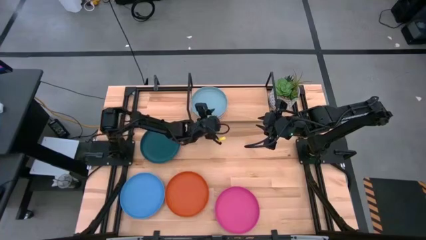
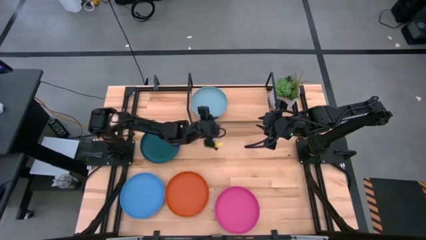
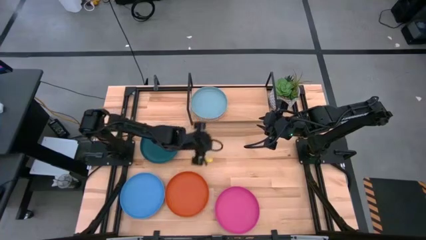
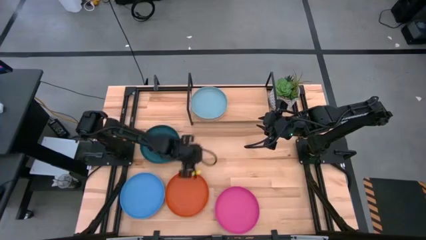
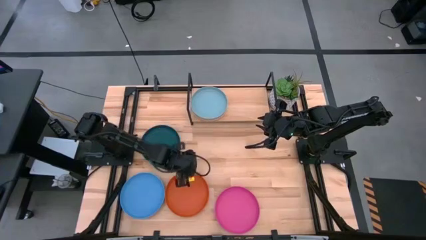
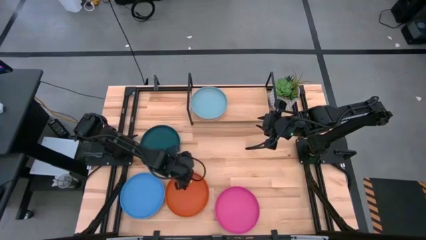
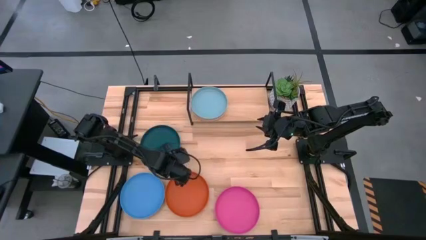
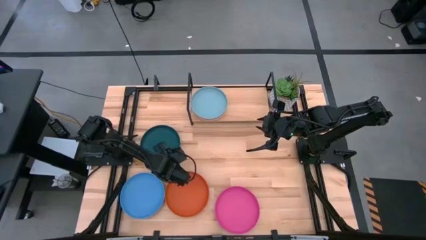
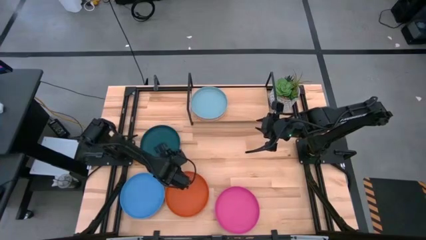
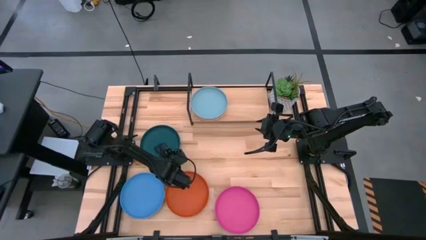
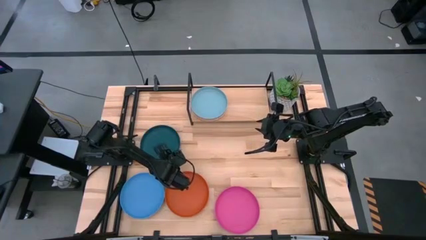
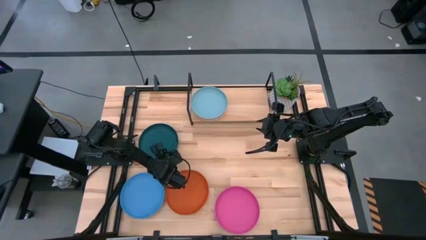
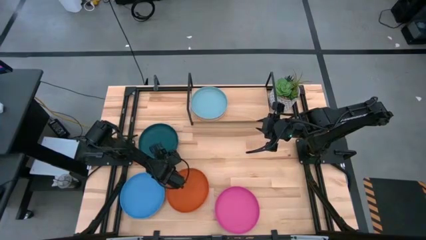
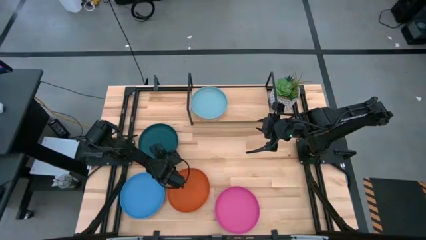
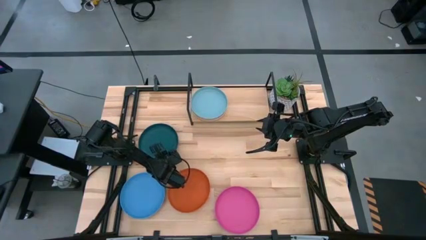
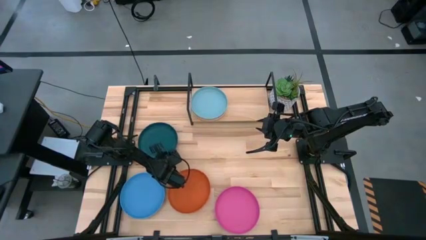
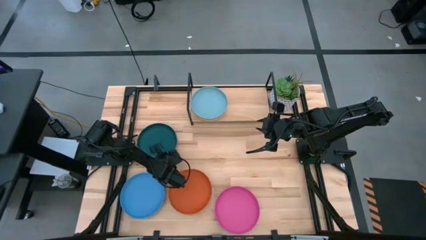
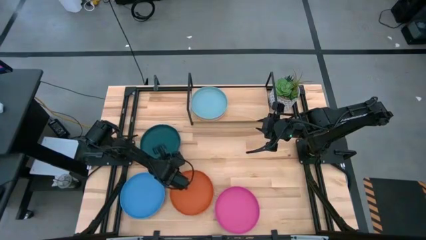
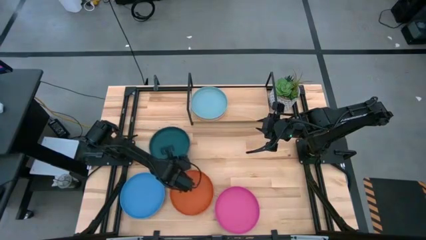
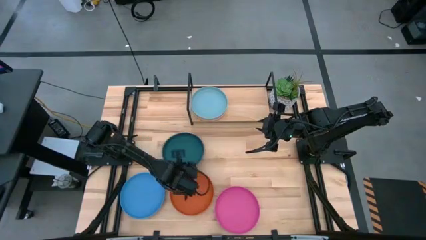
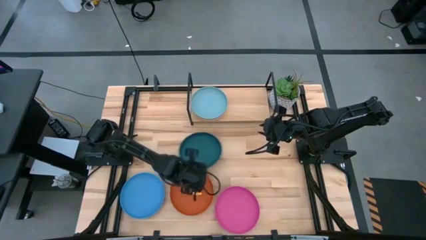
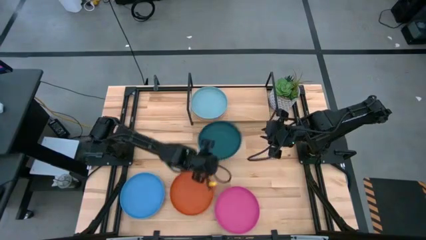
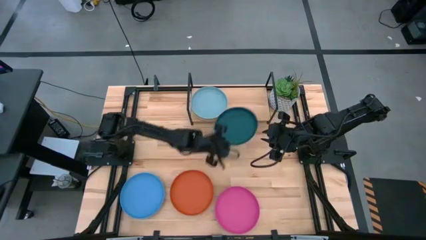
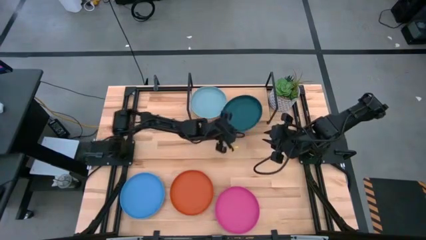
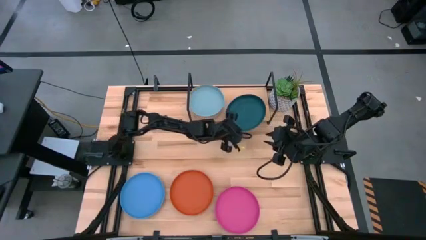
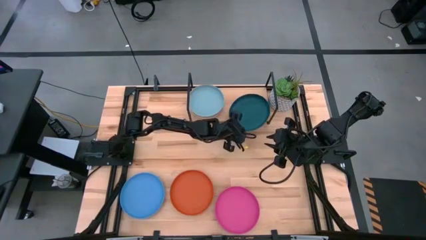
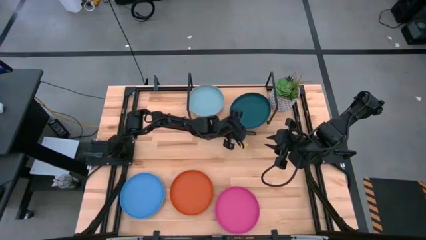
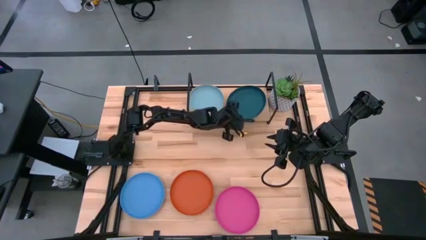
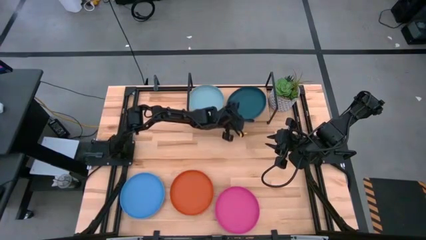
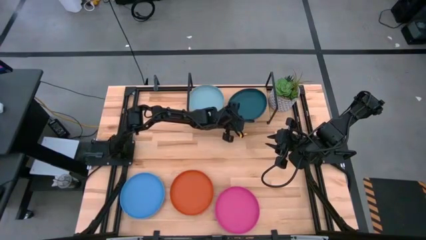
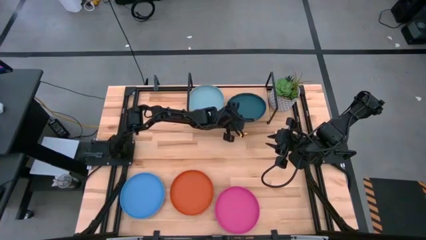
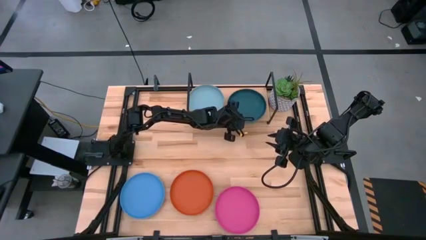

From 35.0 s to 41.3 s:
Task: Place and stack plates onto a shelf
Put the dark blue plate on the shelf

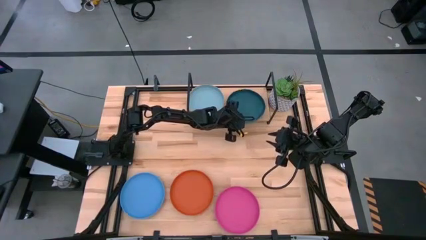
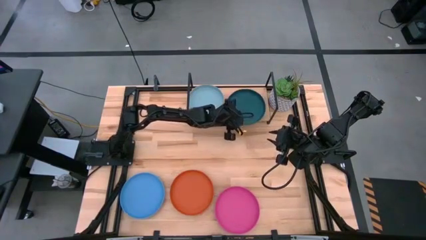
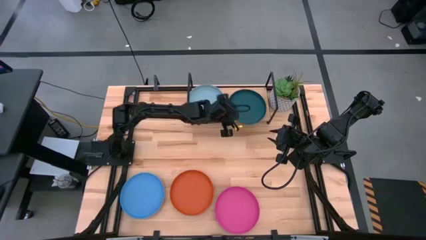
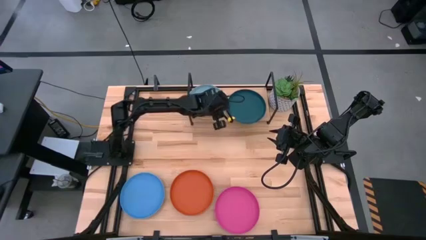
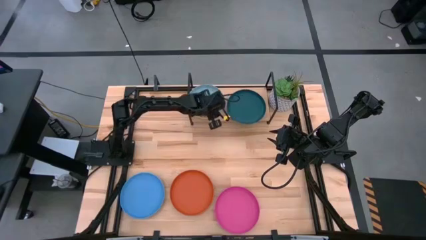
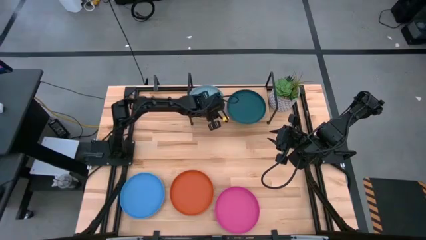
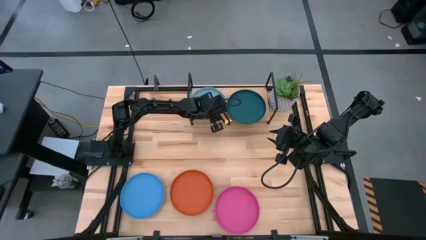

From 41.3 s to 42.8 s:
Adjust the left stacked plates on the shelf

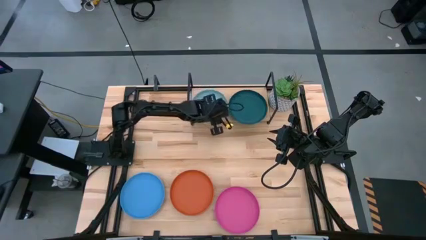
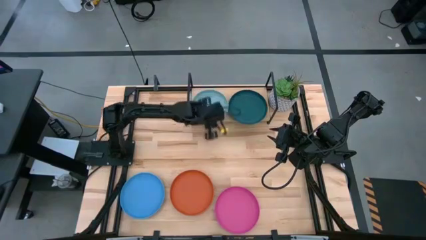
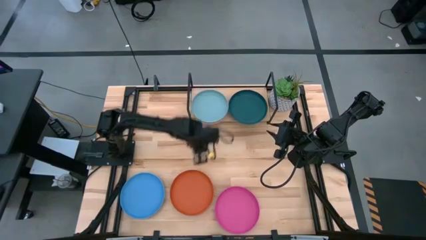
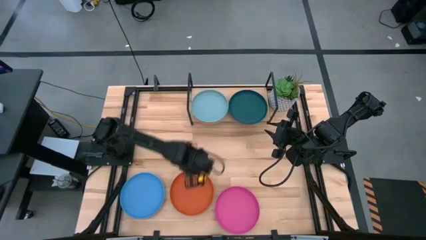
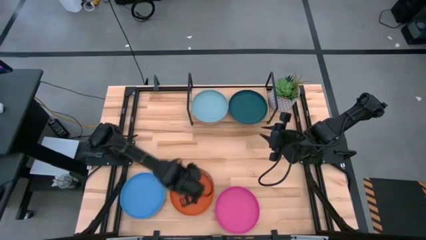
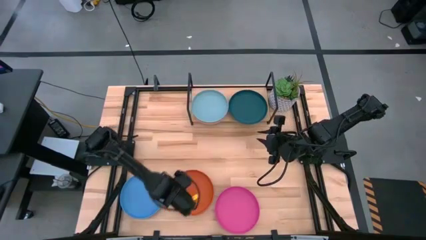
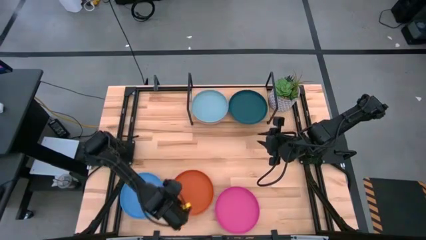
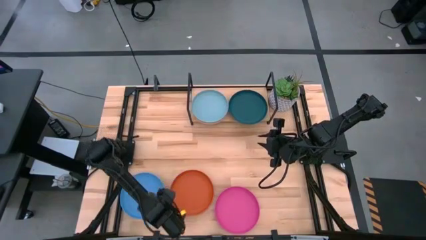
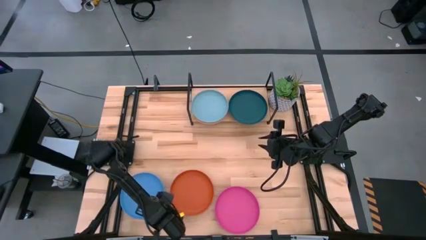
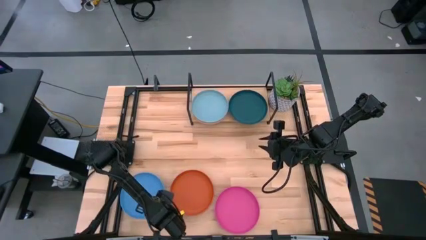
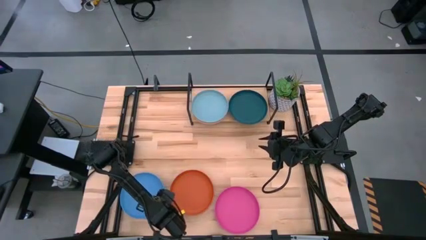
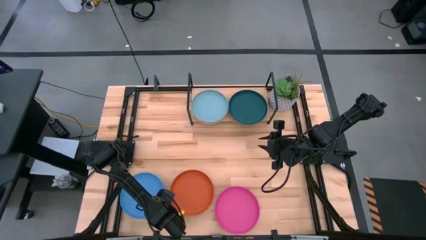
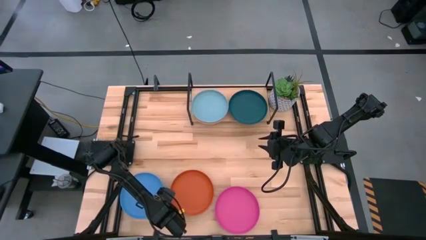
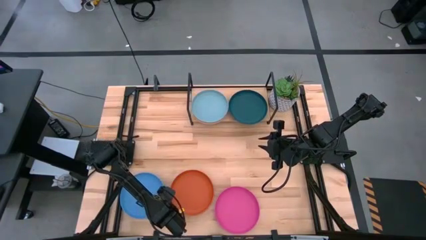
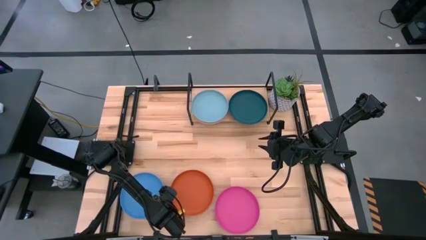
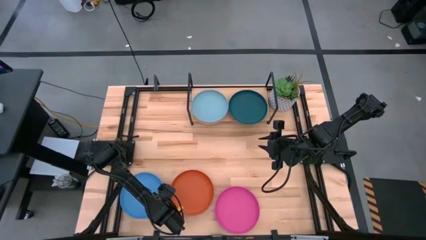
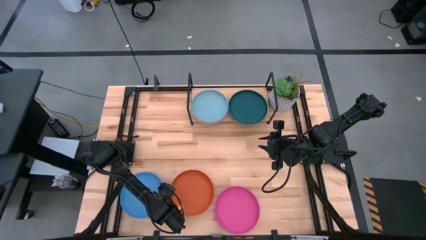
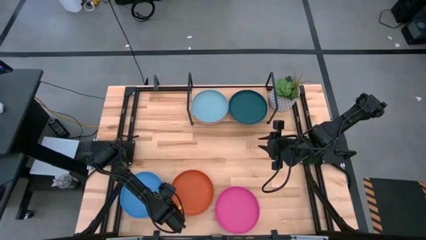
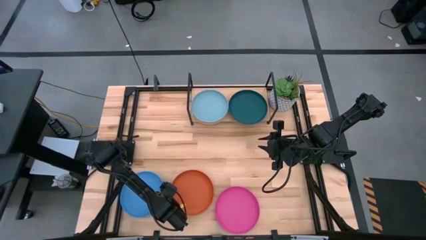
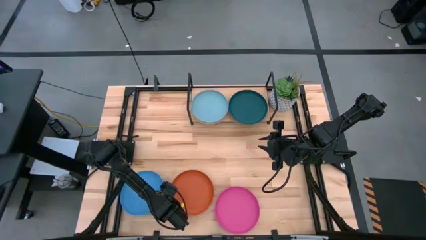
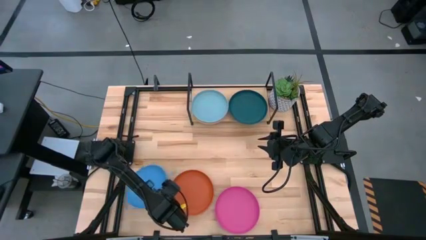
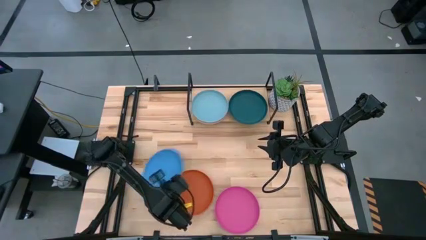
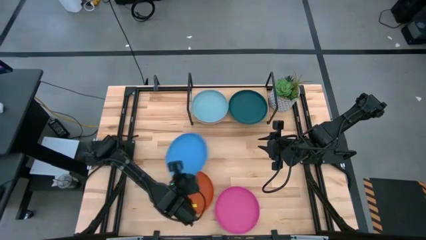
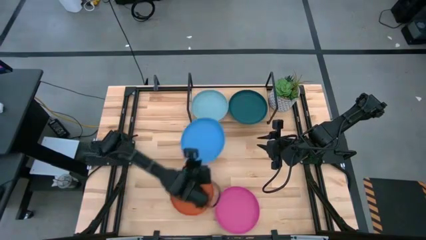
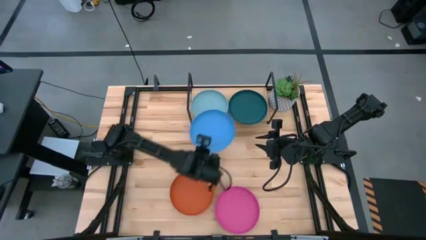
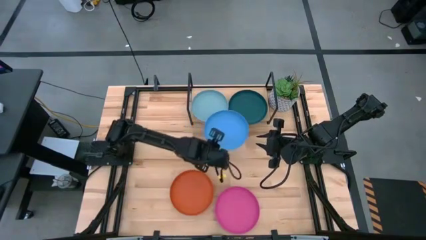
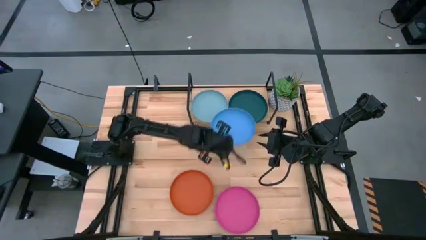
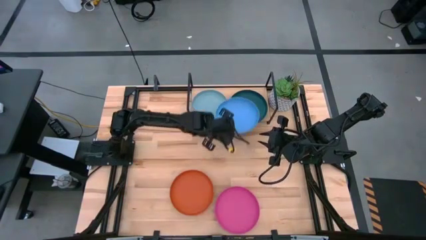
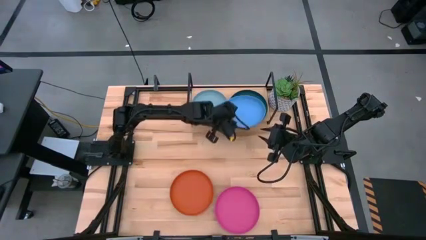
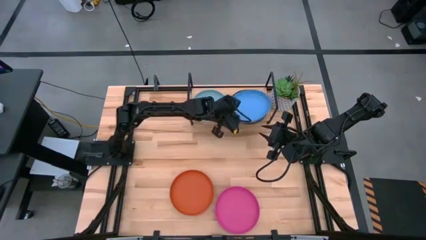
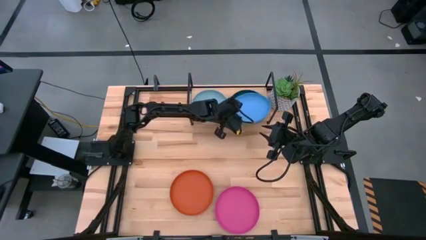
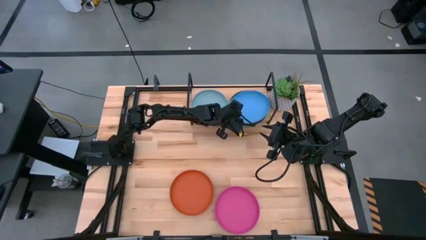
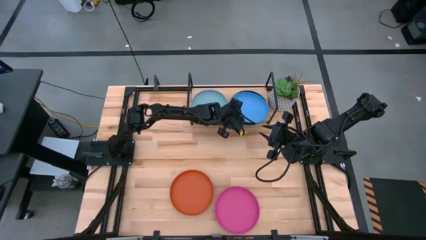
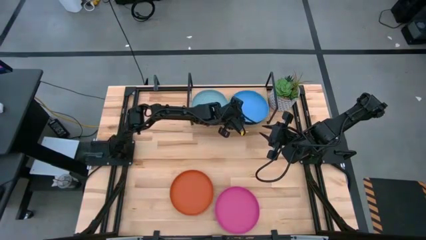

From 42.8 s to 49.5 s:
Stack the blue plate on top of the dark blue plate on the shelf
